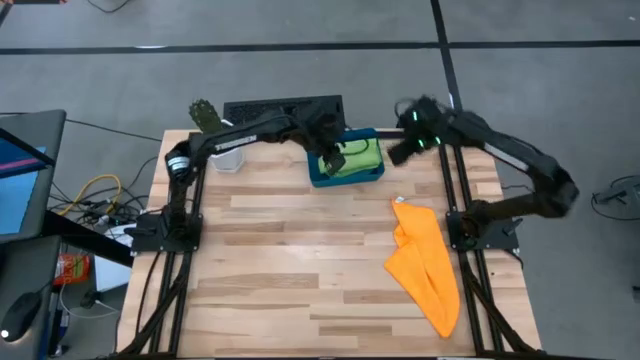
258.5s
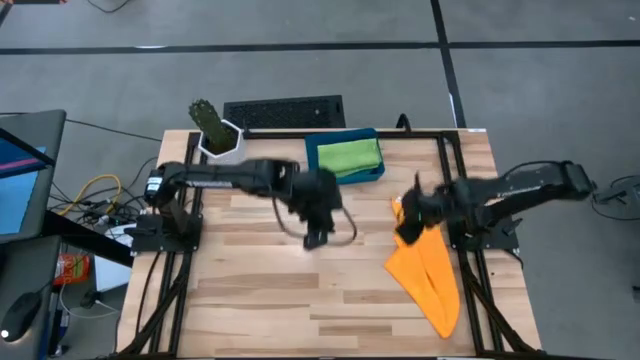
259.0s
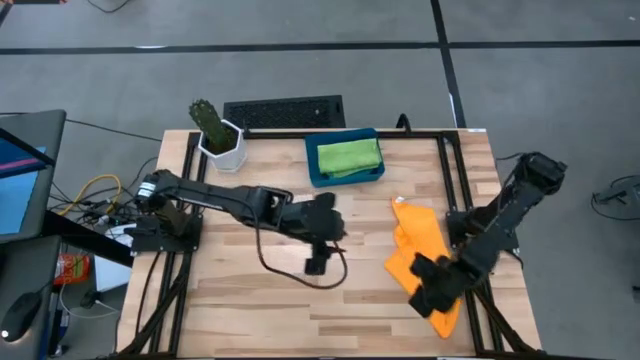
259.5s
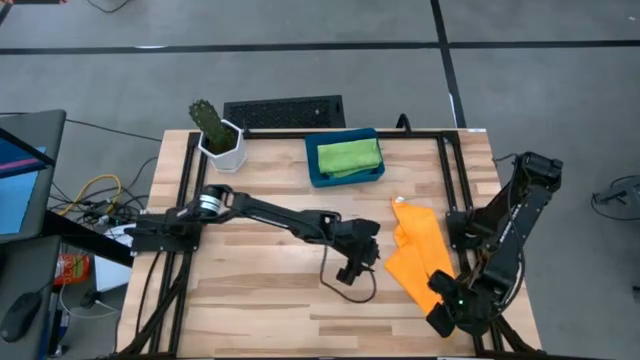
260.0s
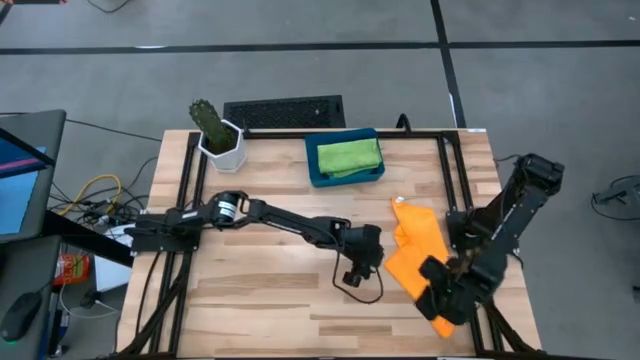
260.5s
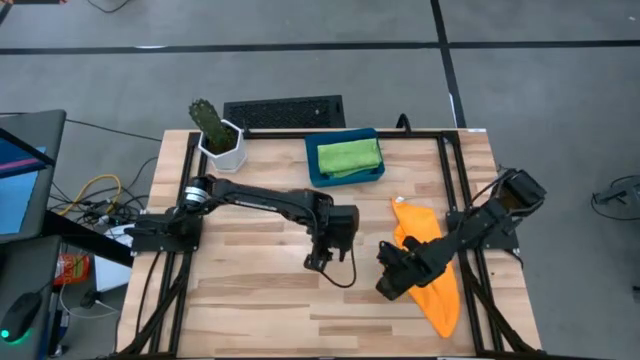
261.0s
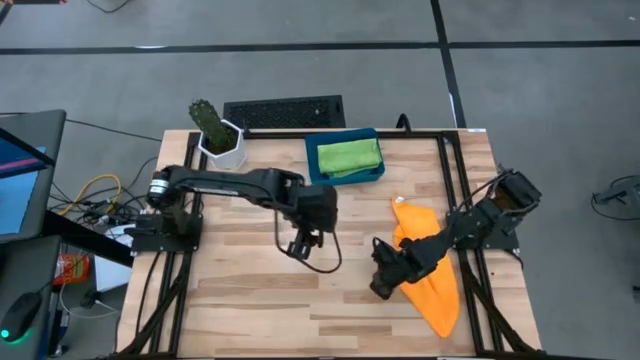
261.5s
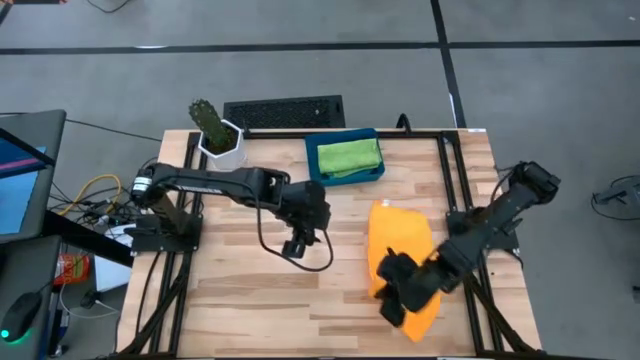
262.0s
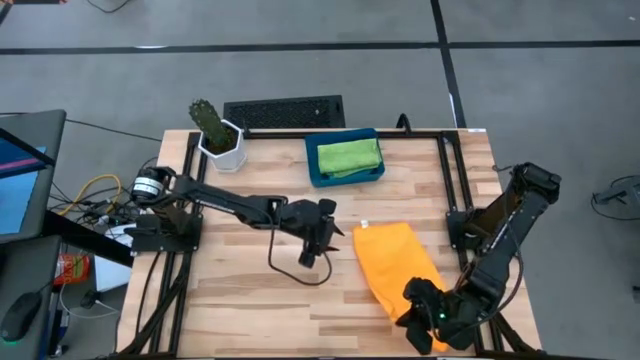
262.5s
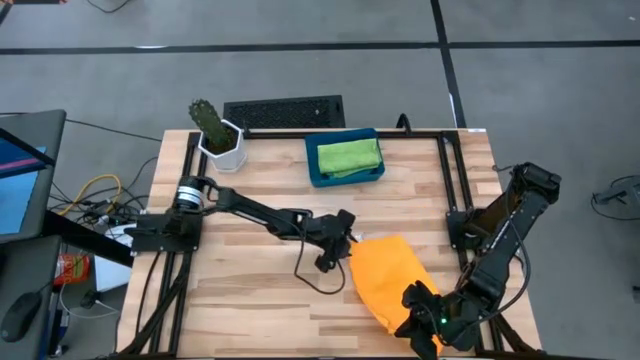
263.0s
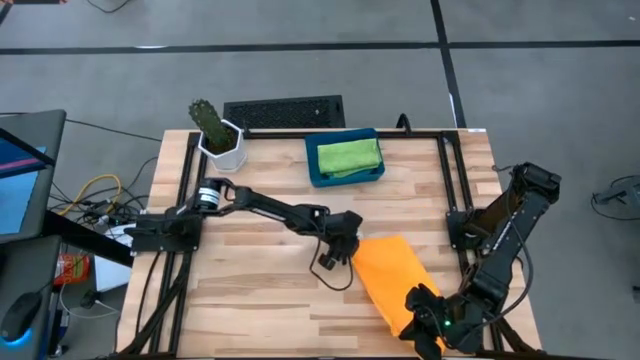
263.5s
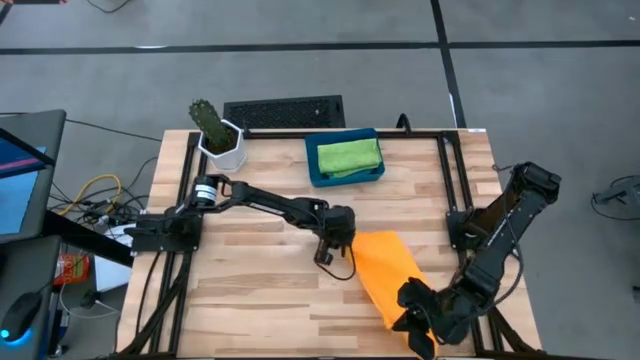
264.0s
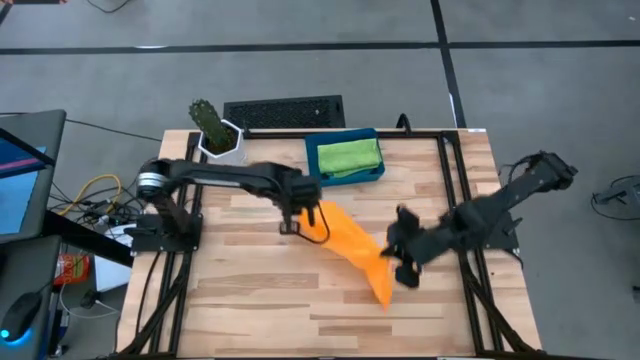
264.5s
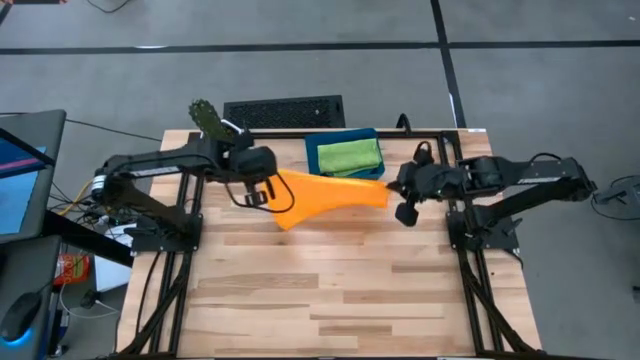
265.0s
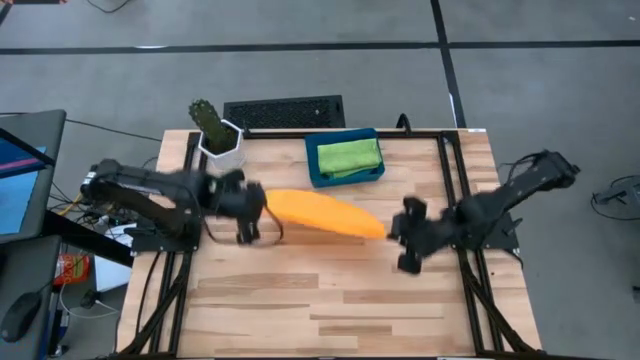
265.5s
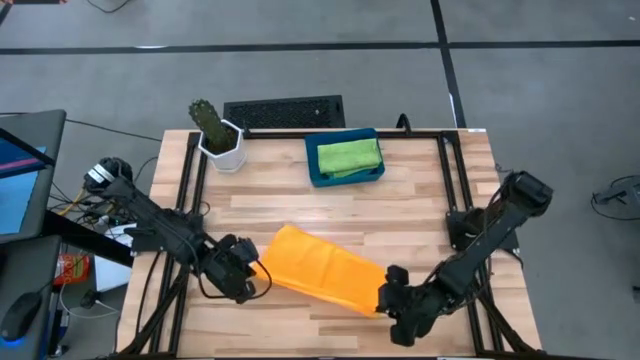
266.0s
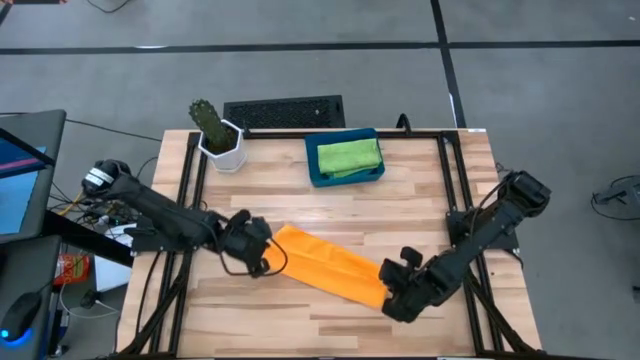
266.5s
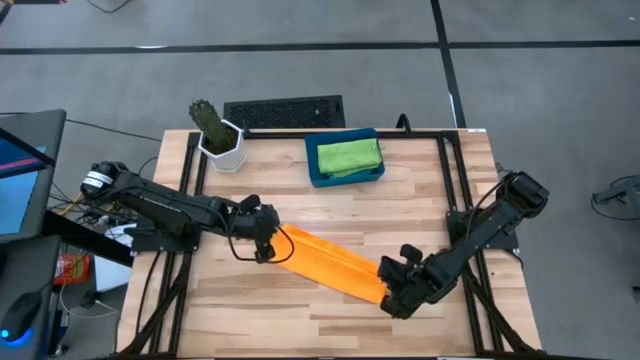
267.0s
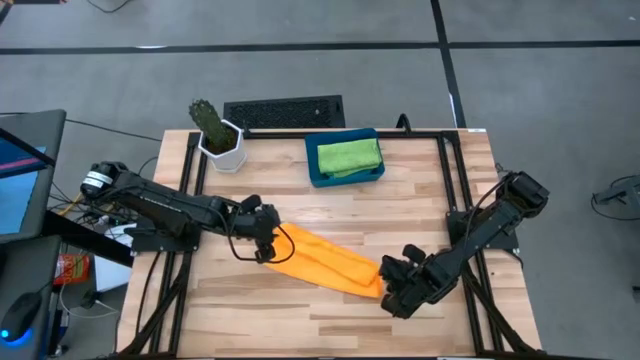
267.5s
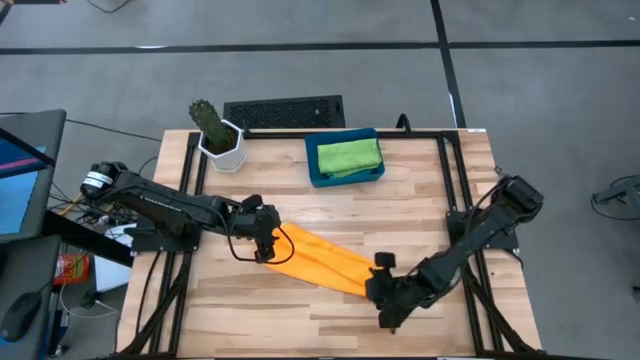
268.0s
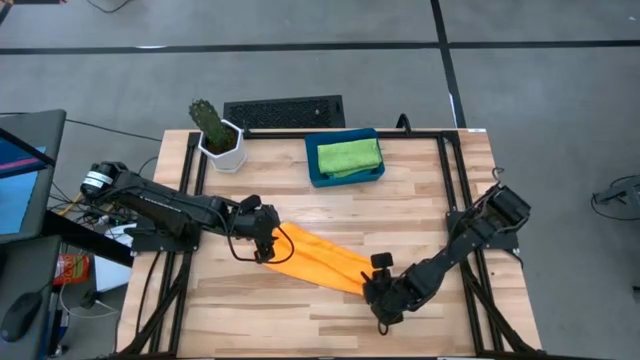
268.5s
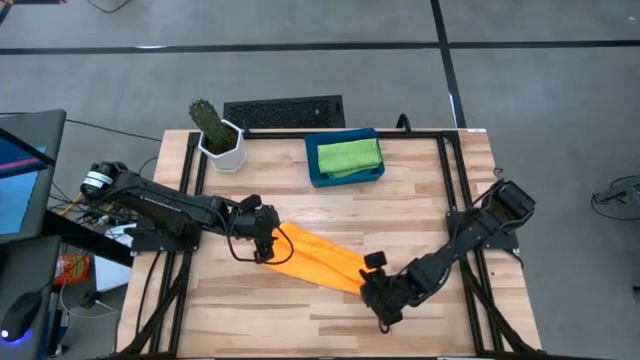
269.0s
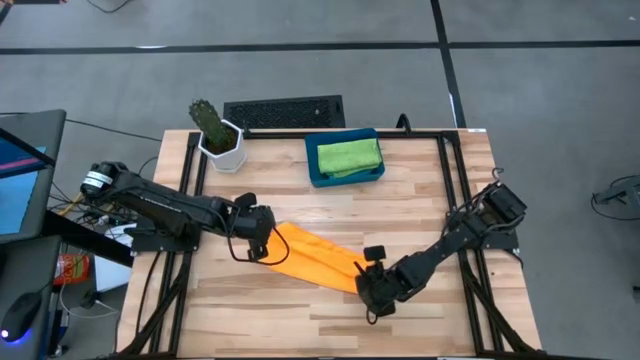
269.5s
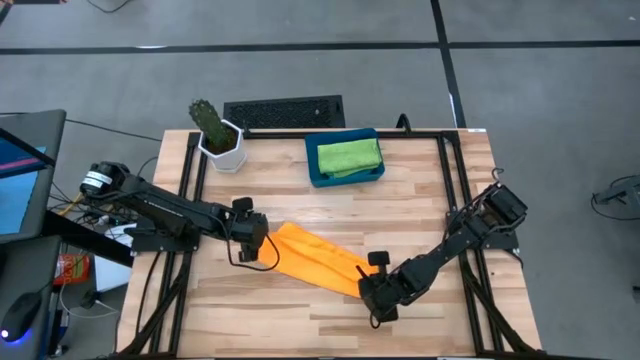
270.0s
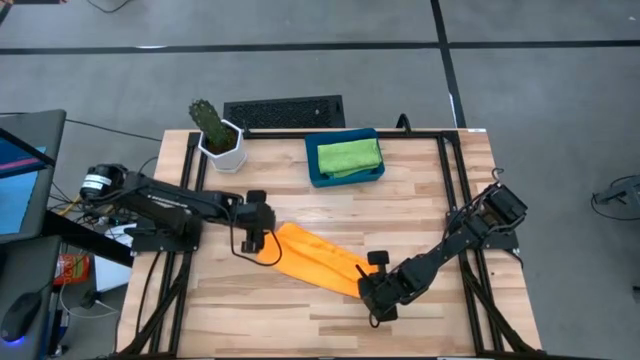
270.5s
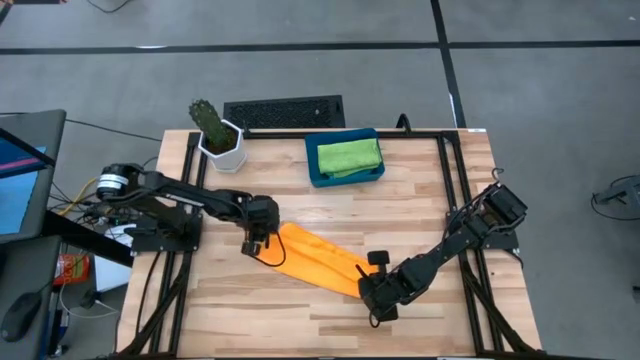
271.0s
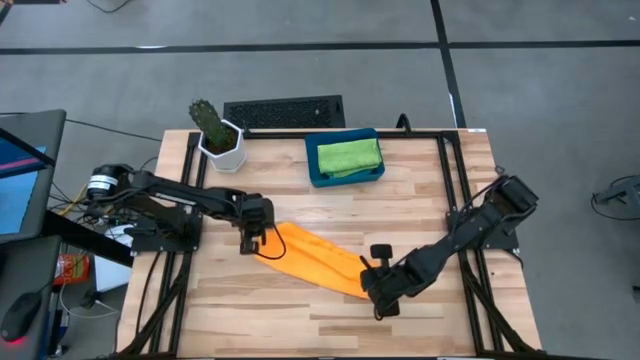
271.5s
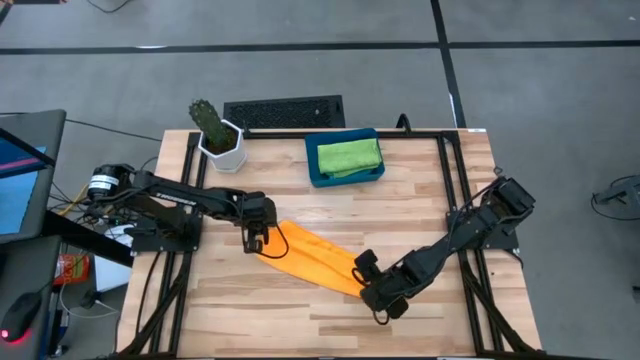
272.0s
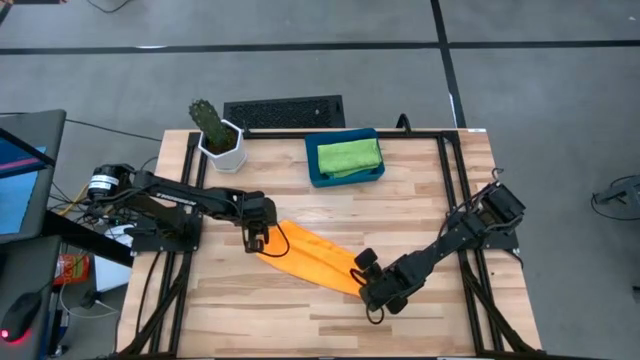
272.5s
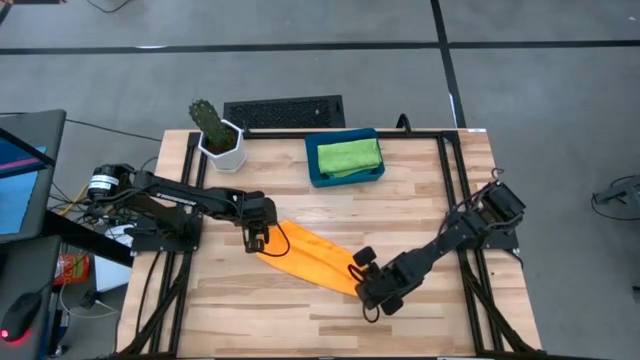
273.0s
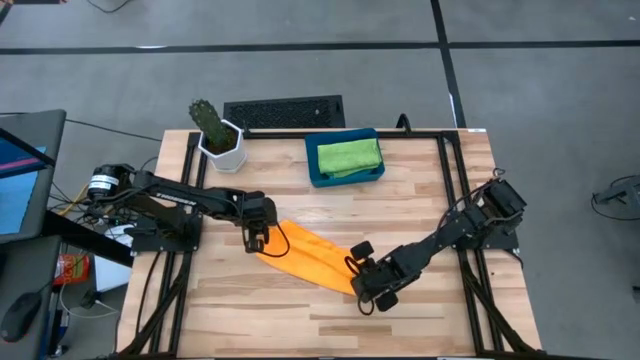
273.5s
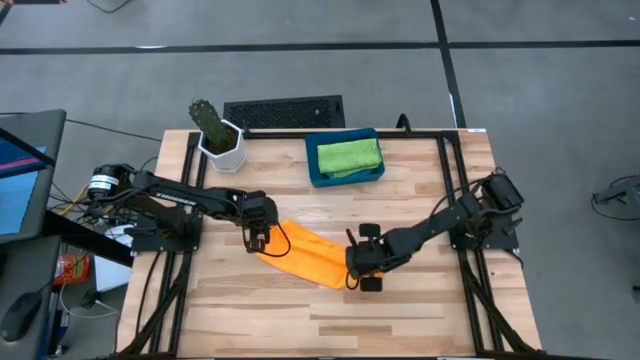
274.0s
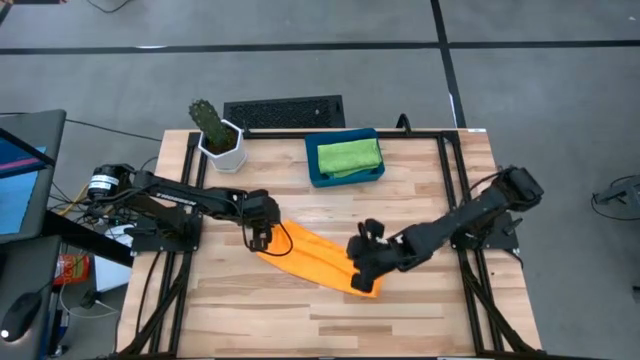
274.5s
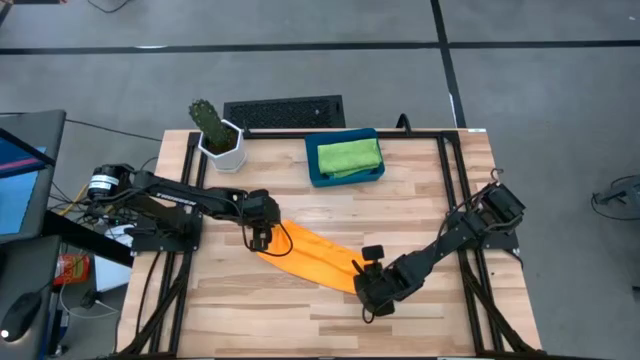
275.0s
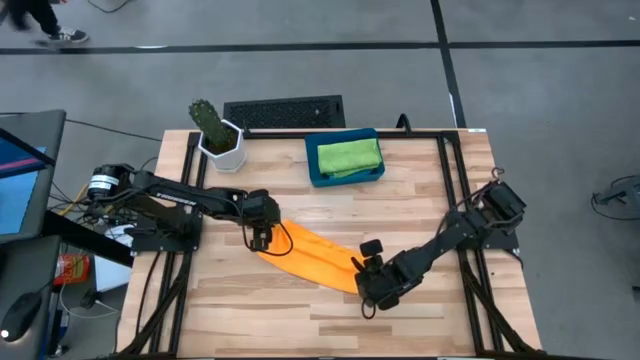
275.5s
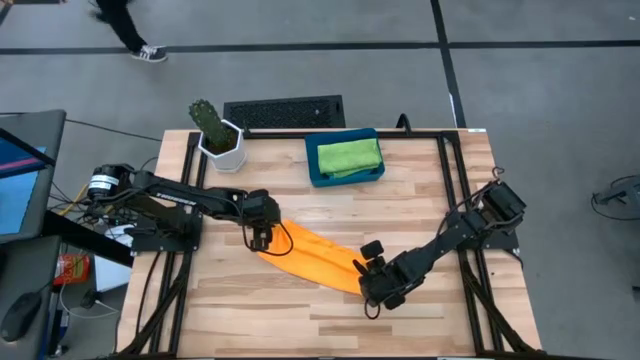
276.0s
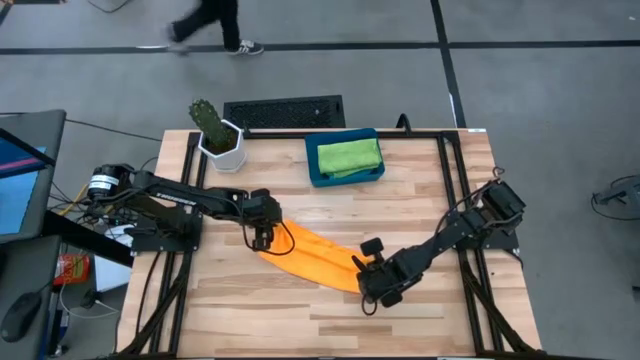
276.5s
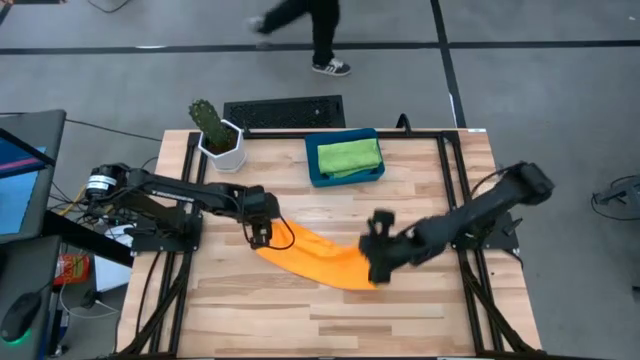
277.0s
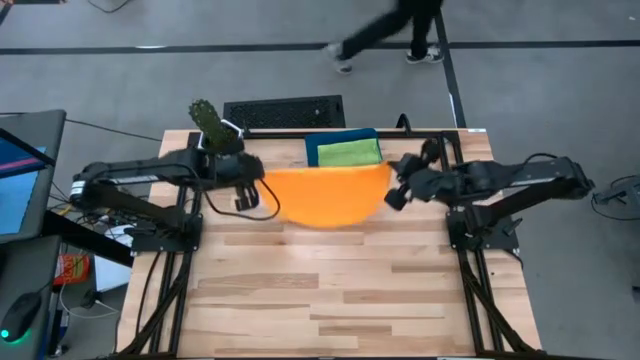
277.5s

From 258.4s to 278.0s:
Task: Fold microfiber towels
Fold the orange microfiber cloth
